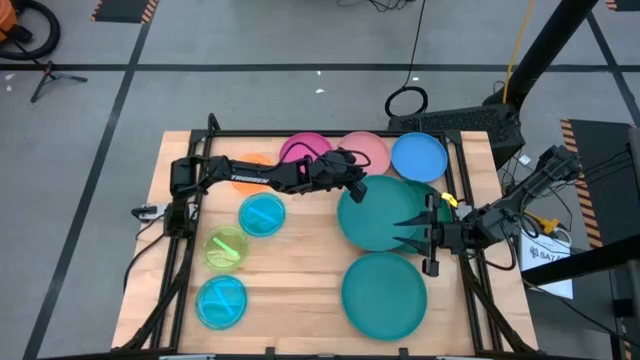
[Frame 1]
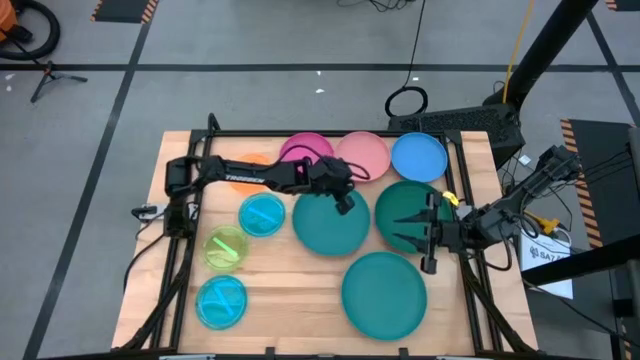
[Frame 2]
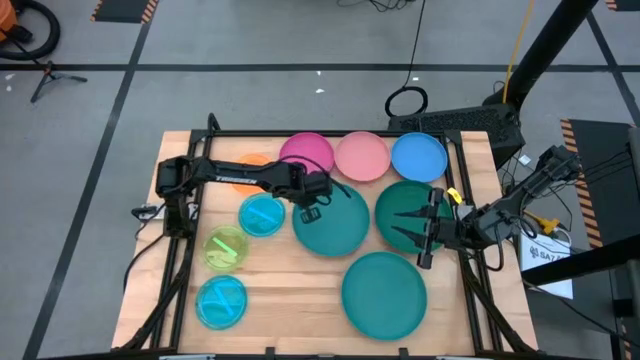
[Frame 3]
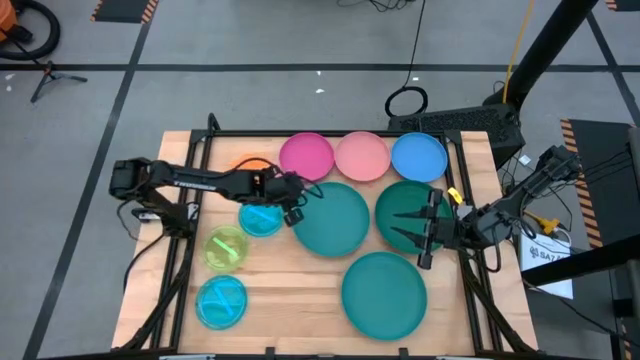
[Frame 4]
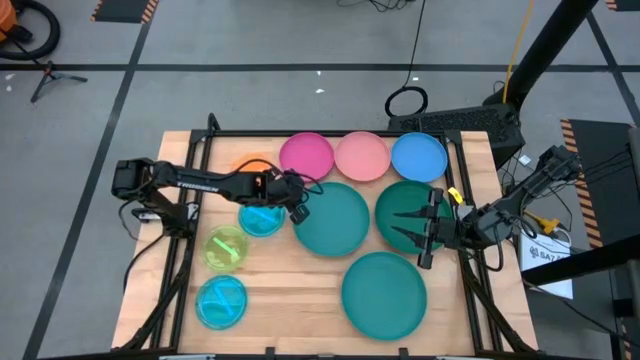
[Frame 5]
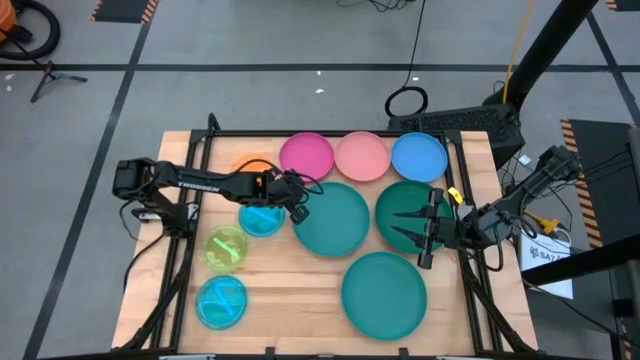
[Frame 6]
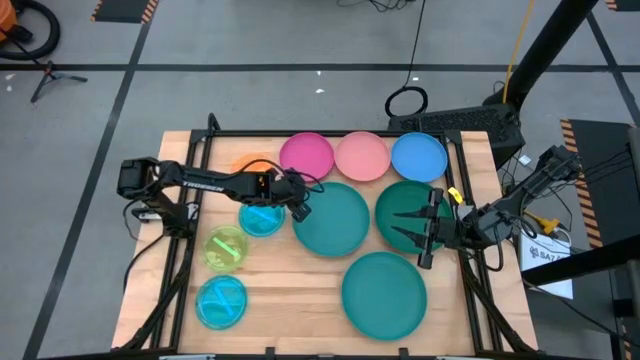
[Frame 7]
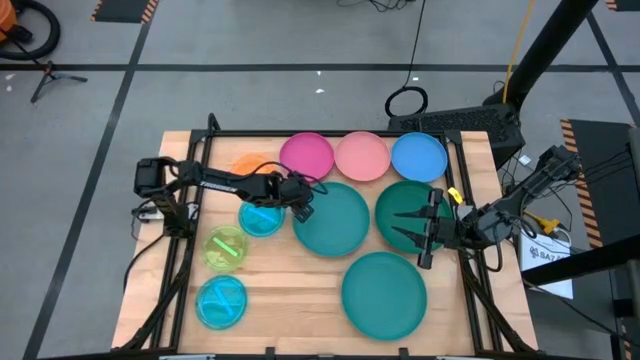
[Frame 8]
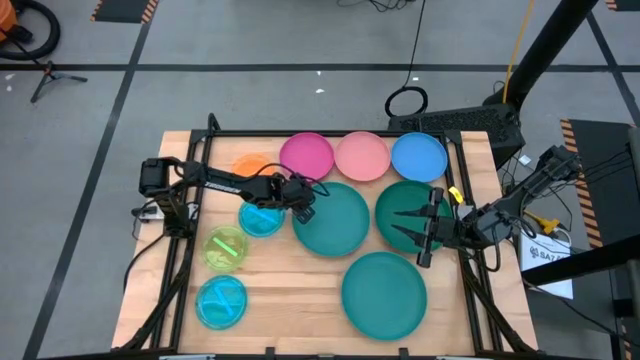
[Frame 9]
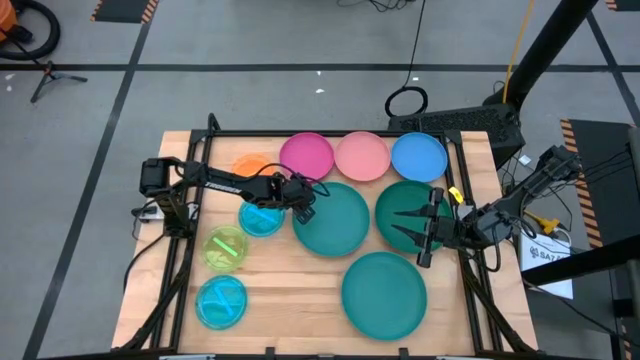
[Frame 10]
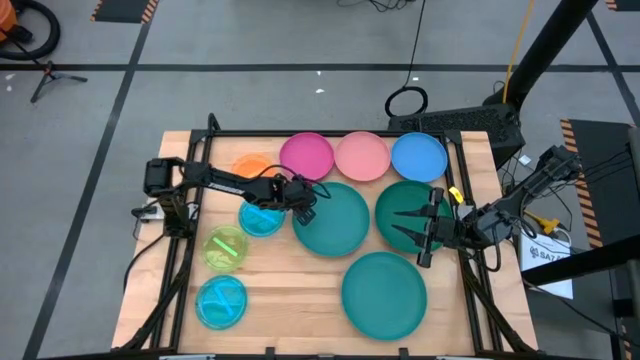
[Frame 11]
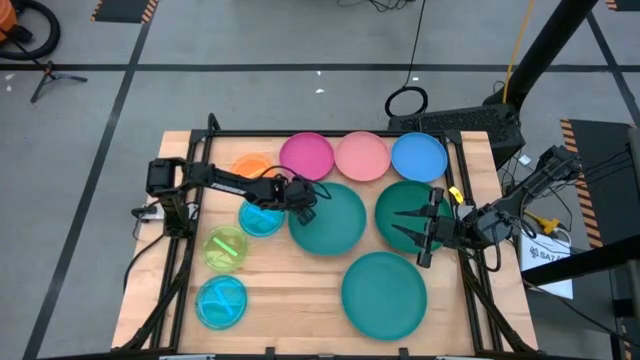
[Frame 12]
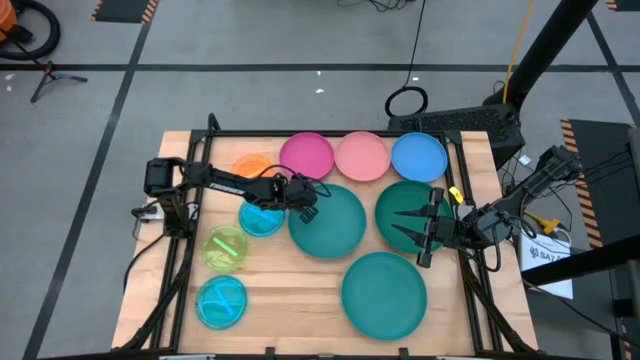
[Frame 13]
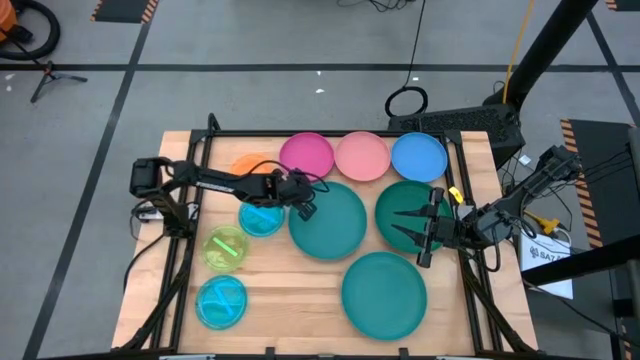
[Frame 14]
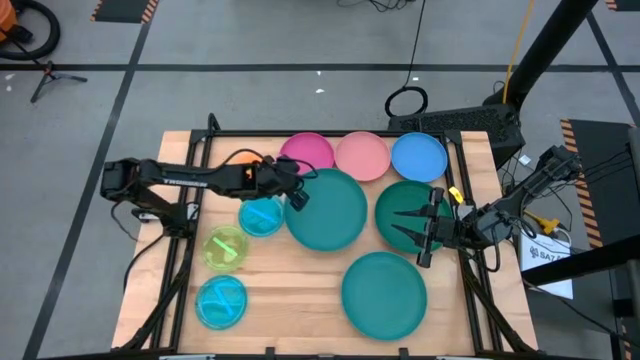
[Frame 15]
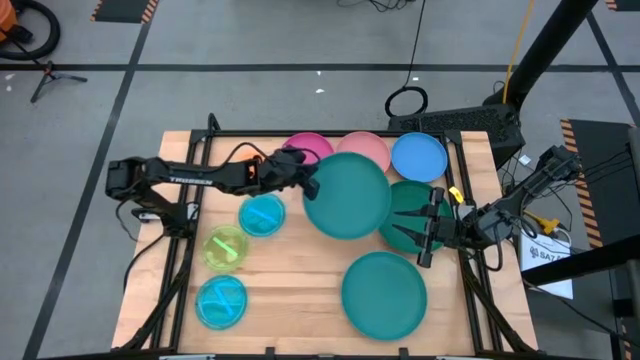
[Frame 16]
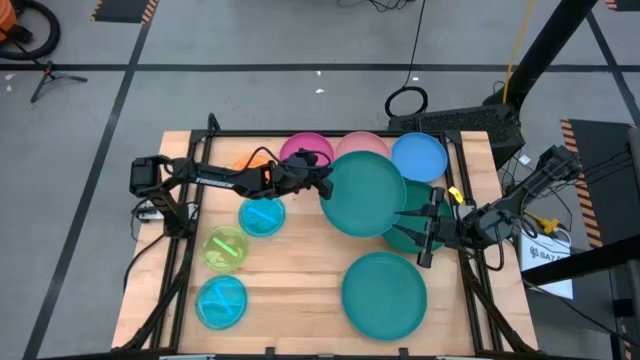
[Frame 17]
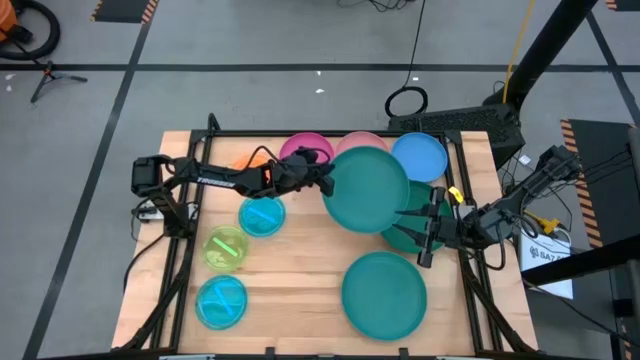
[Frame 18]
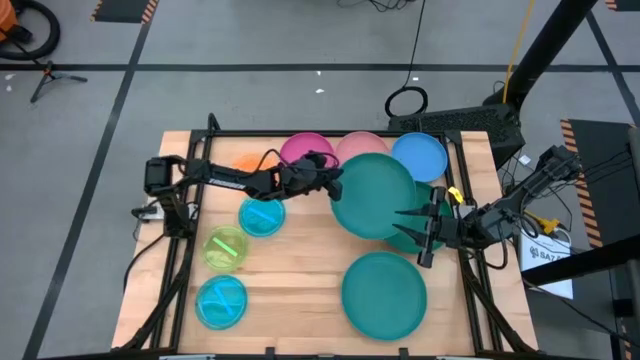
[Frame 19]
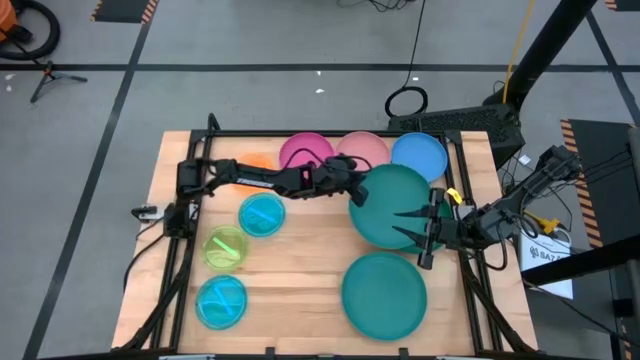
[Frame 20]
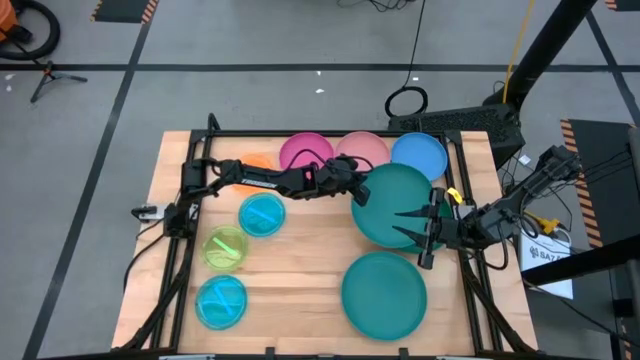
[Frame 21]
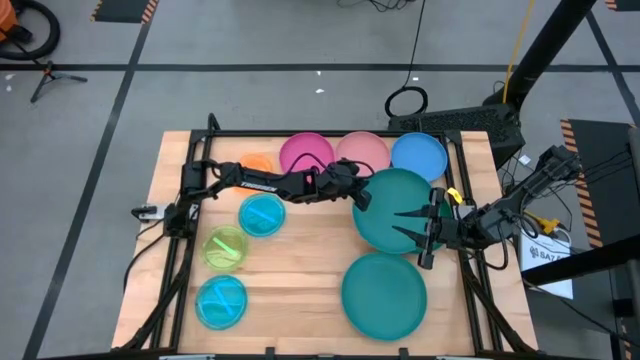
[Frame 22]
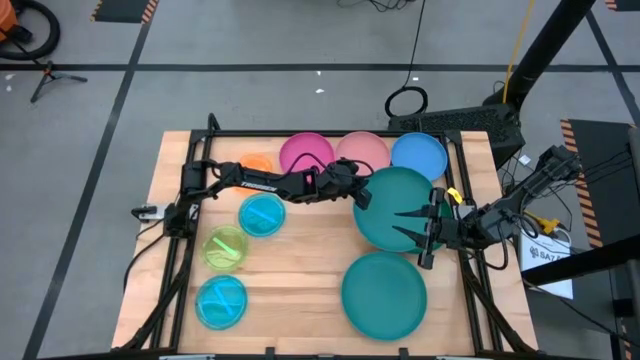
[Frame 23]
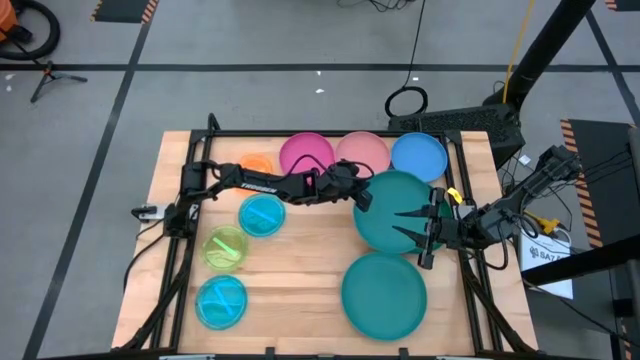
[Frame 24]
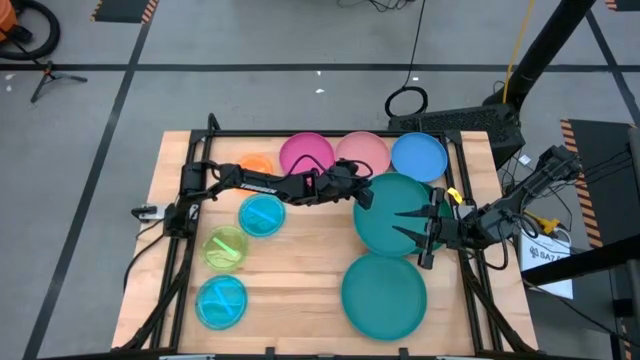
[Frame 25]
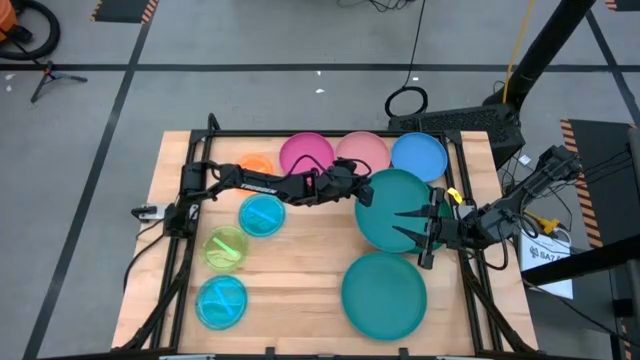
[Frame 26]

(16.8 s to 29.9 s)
Task: Stack plastic plates
Stack the top dark blue plate on top of the green plate

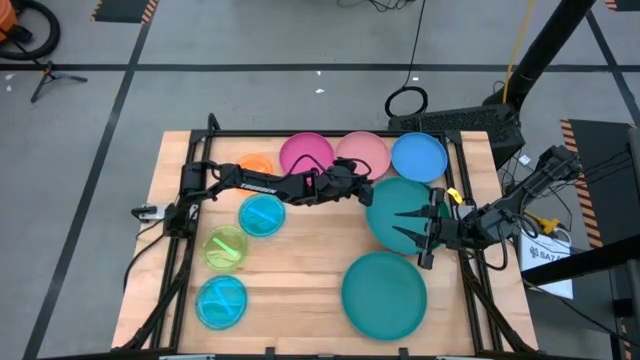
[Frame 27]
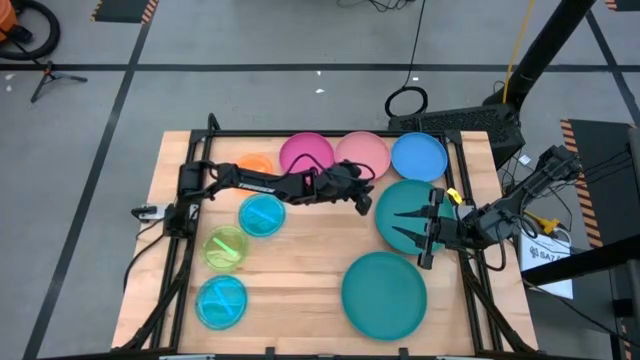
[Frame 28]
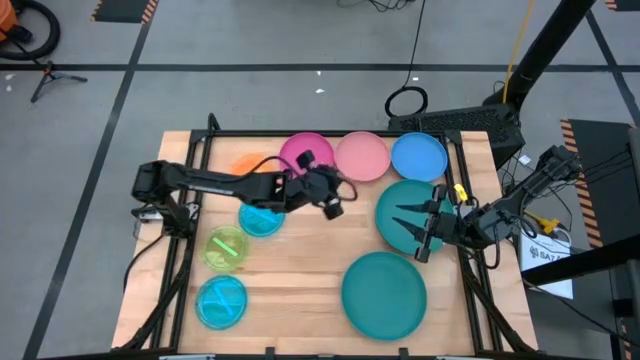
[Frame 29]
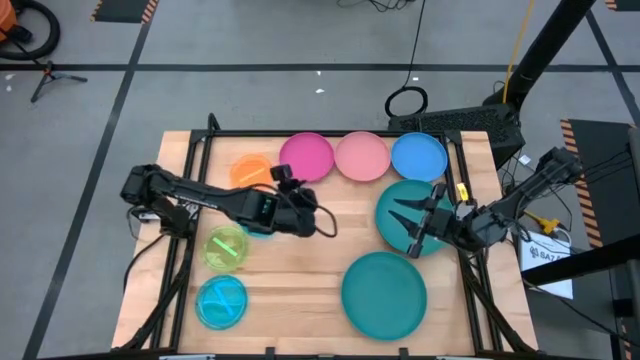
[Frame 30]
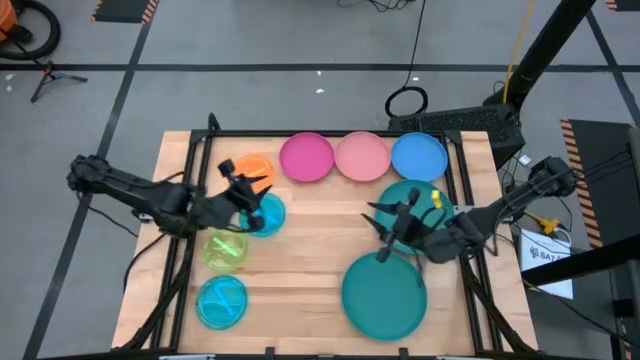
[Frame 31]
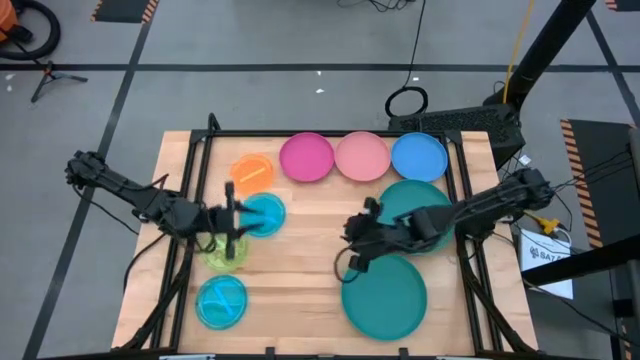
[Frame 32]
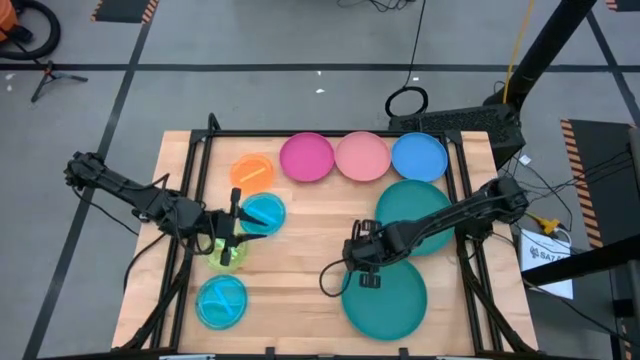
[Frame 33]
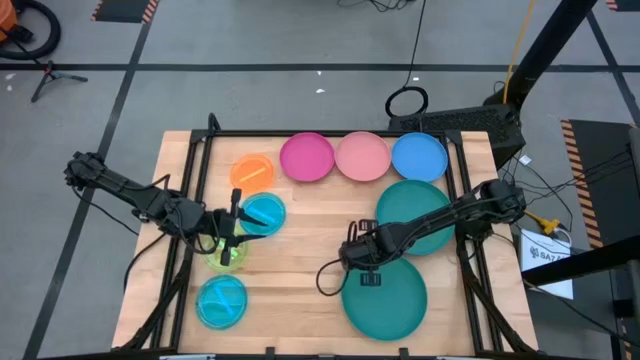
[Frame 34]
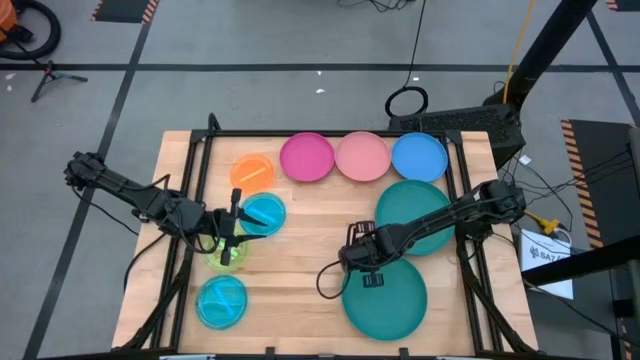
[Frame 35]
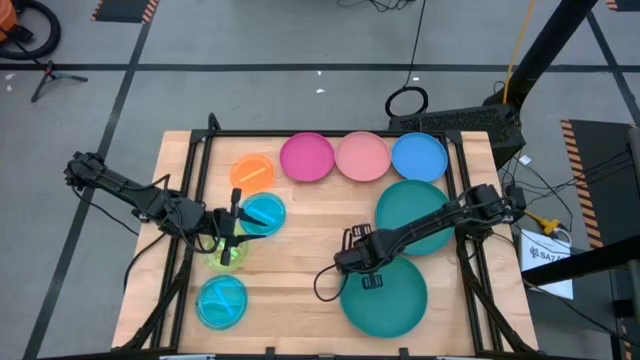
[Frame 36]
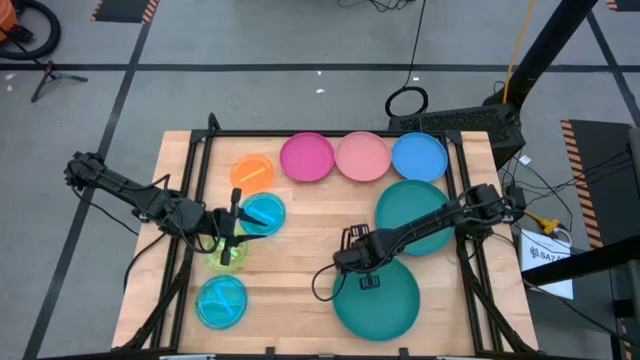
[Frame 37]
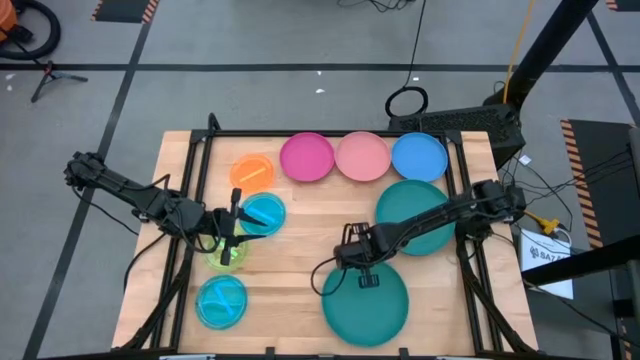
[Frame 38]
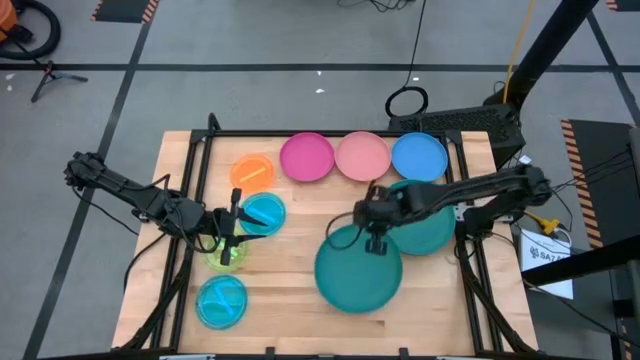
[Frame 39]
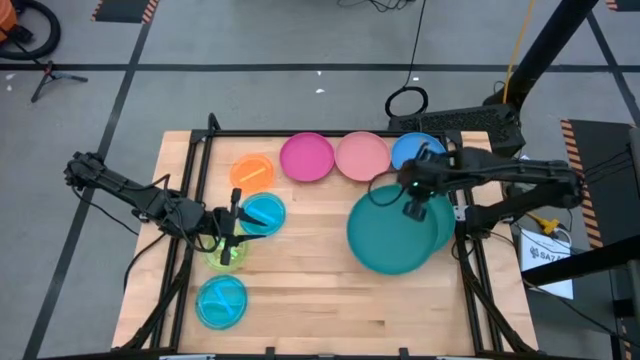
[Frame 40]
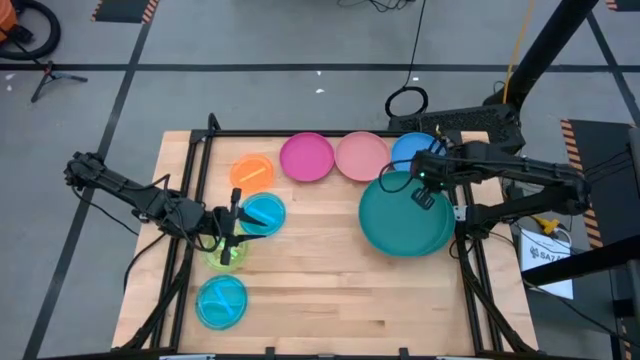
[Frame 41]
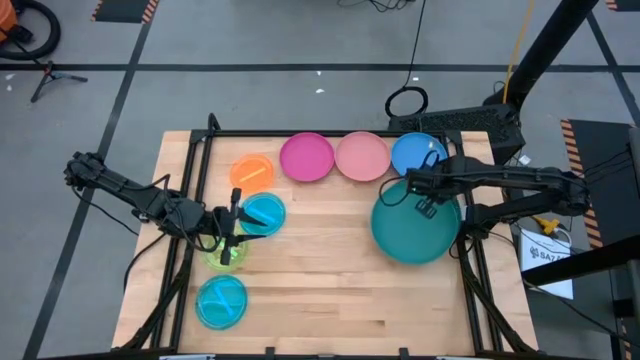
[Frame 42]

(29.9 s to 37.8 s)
Stack the dark blue plate on top of the dark blue plate
